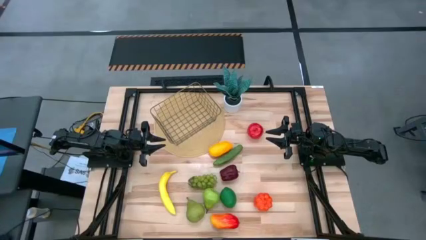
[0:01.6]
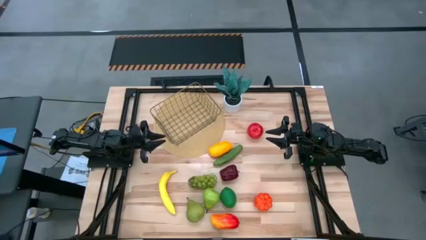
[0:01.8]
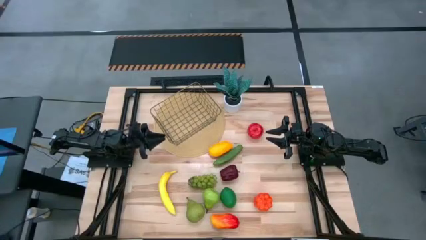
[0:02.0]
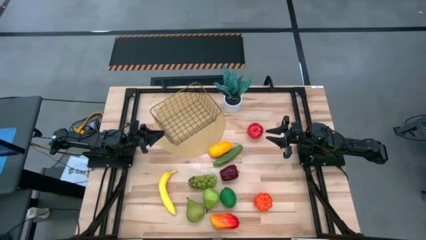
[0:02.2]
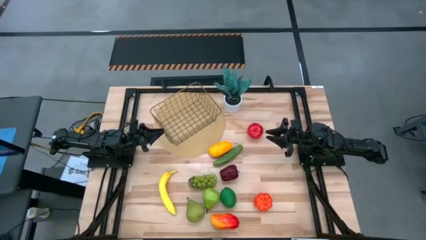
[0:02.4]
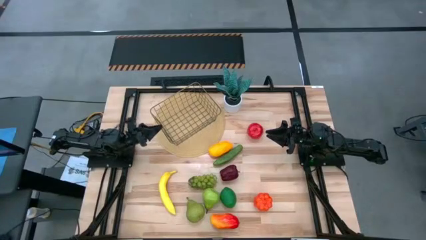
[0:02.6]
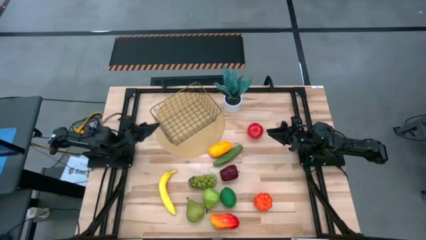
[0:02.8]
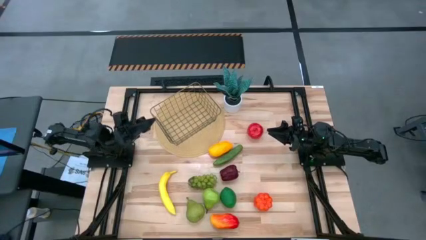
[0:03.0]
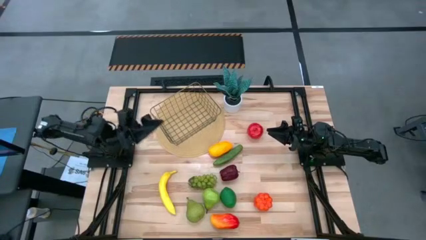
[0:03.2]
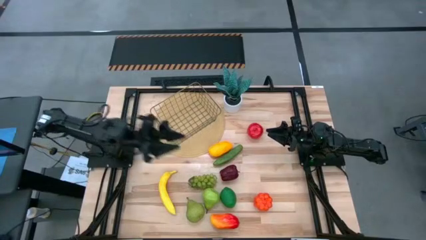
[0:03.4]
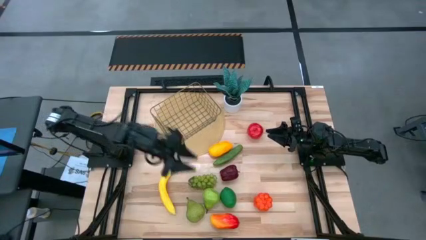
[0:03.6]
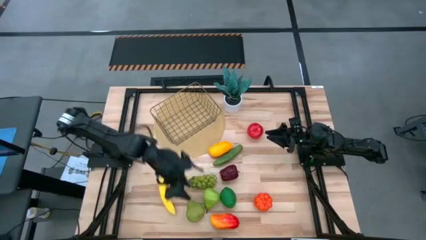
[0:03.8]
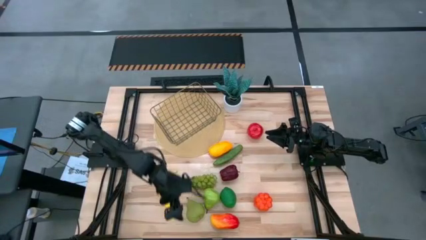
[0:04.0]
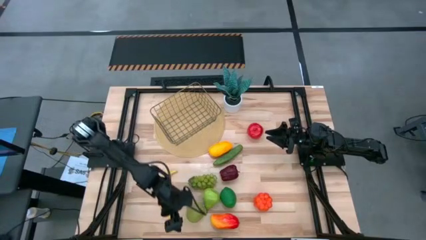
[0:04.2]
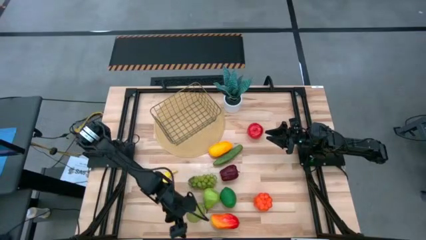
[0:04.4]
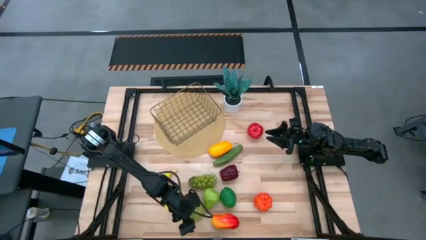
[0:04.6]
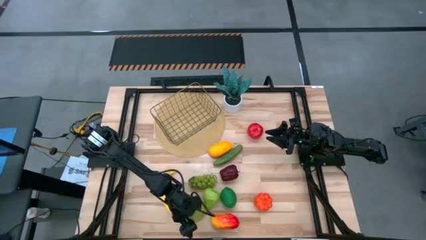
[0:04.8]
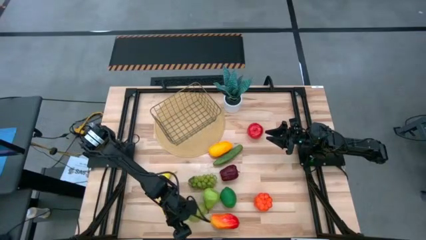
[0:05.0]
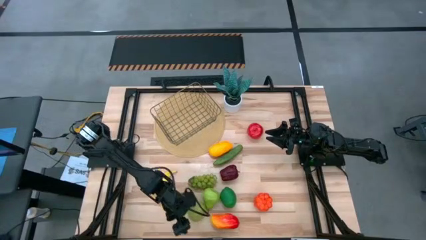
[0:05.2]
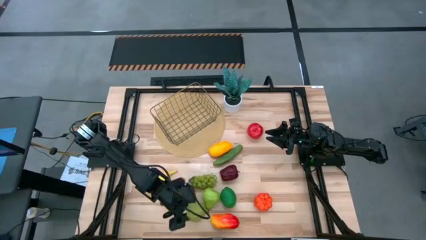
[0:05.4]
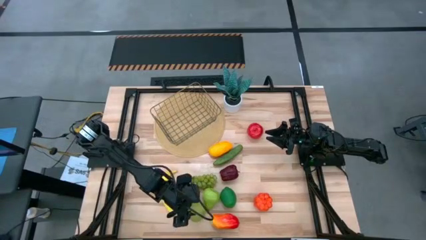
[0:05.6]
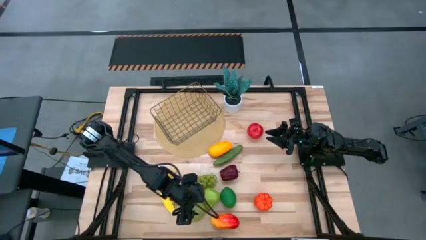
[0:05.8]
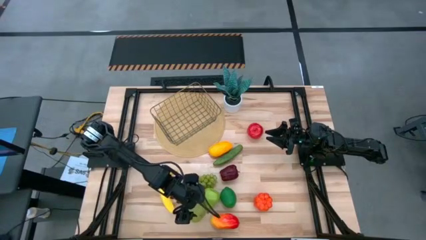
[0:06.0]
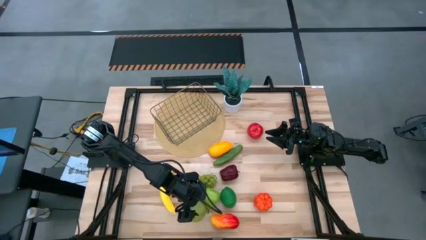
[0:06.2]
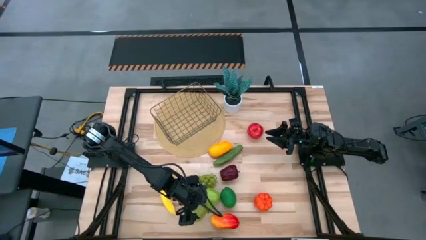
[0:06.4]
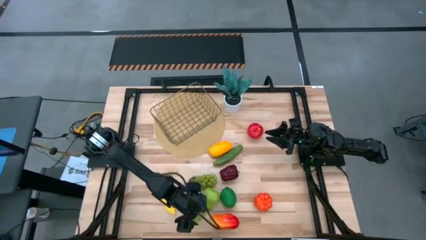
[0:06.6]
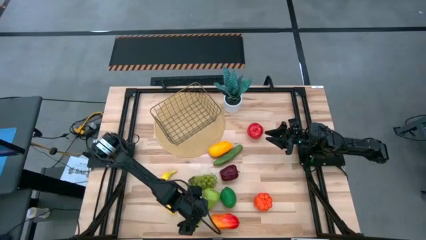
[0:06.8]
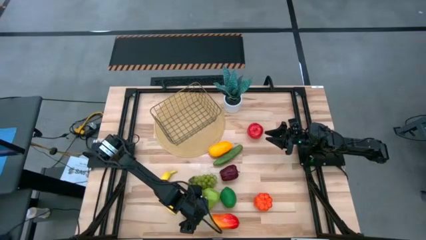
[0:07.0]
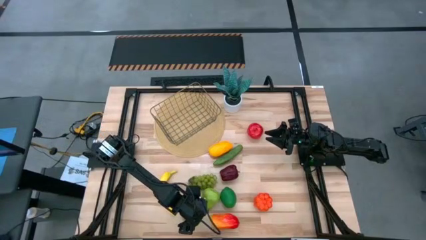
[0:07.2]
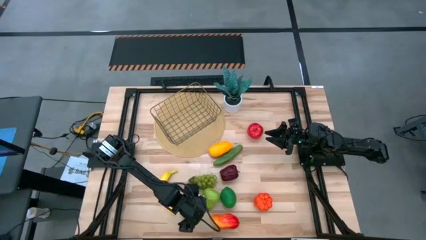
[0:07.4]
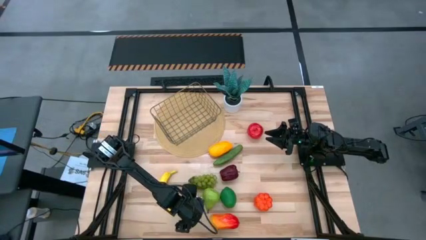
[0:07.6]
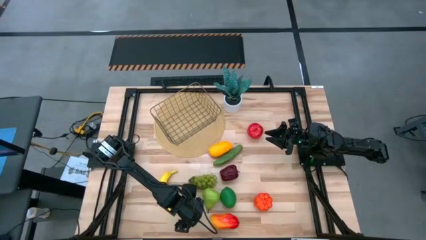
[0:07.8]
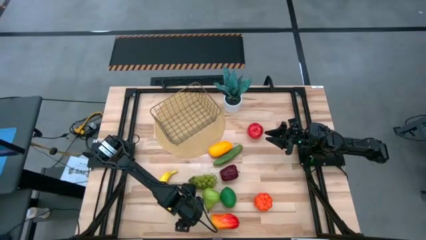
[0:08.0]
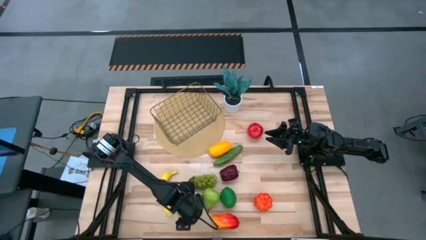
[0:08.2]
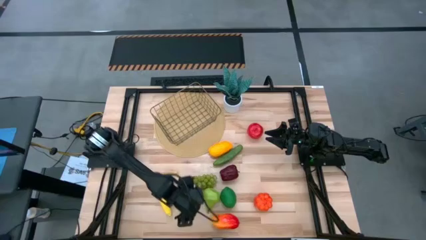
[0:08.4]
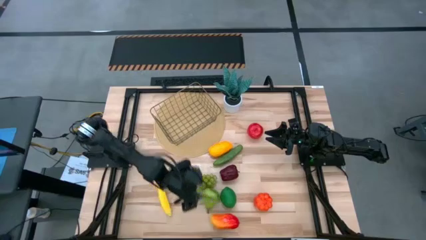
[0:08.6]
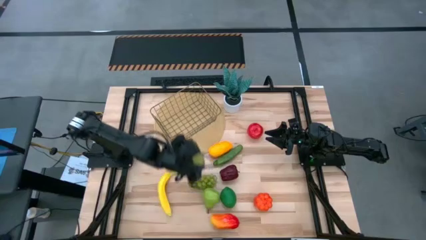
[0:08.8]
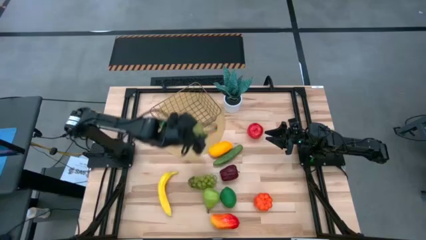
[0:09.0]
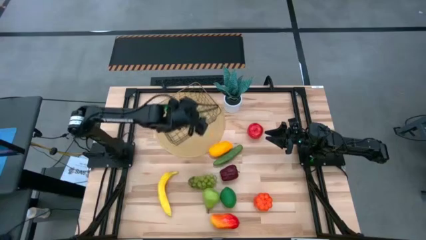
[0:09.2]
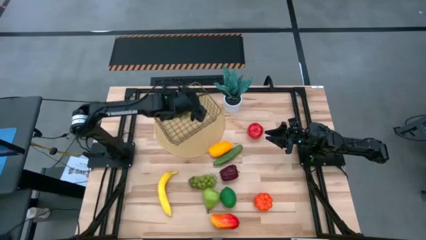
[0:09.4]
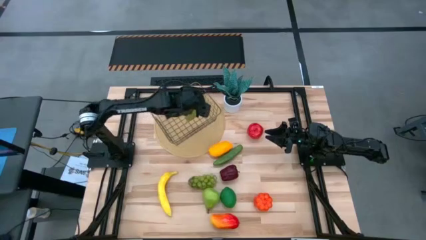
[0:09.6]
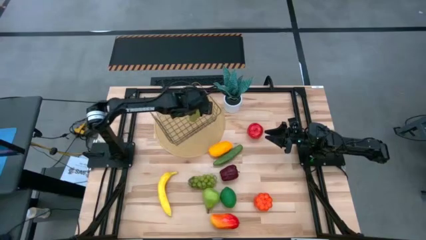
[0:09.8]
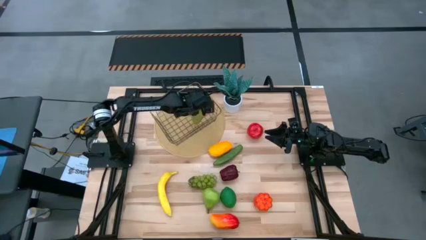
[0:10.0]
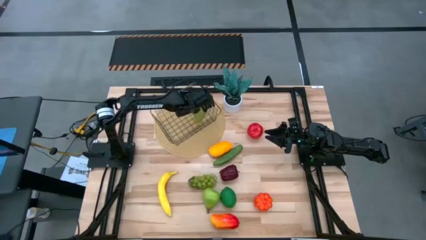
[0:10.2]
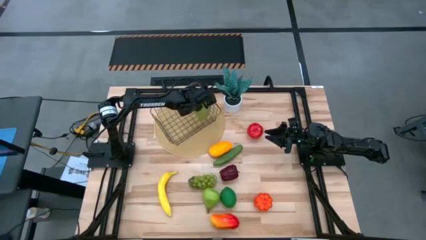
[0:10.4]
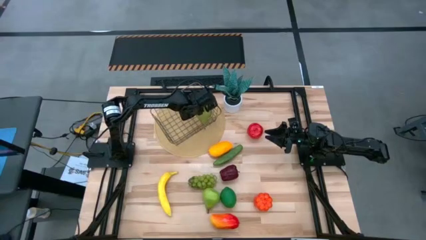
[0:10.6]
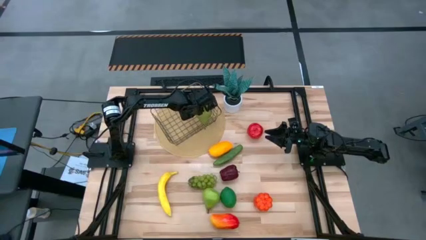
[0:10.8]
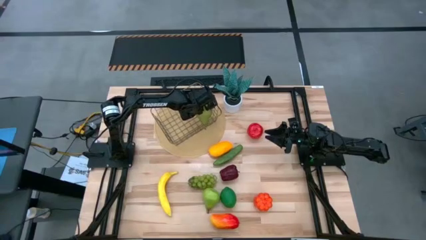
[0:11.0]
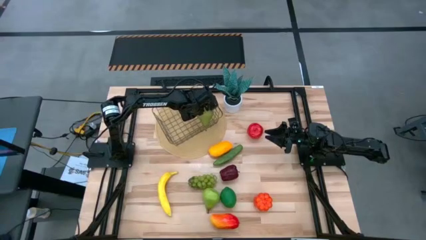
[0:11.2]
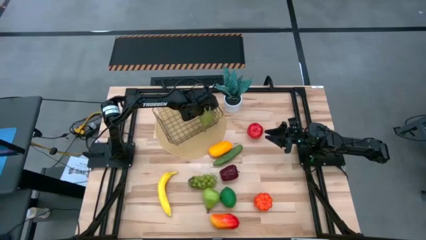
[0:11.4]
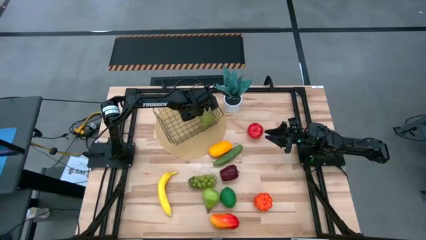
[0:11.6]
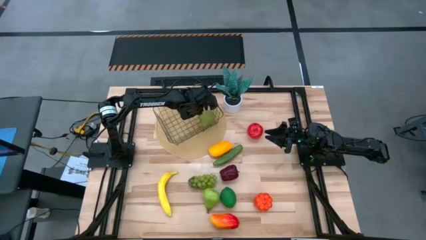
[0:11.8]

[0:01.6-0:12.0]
Task: Build produce basket
Put the left pear into the wire basket

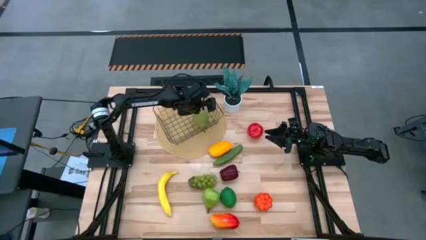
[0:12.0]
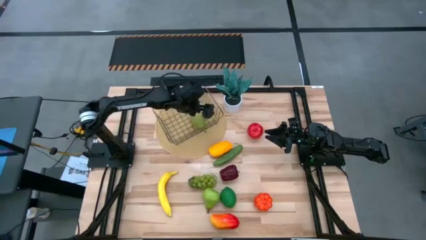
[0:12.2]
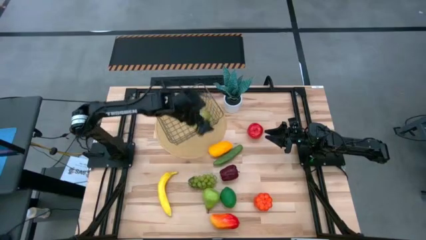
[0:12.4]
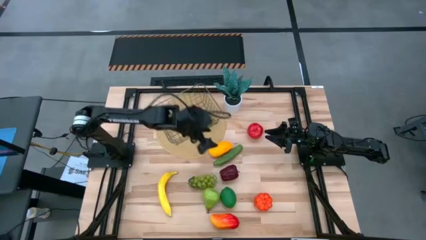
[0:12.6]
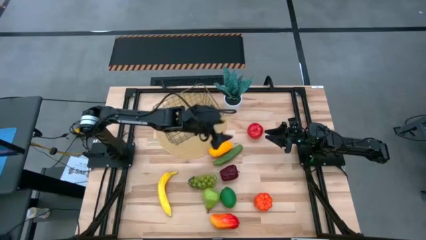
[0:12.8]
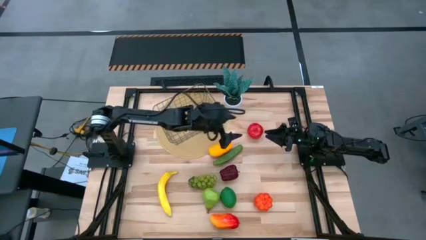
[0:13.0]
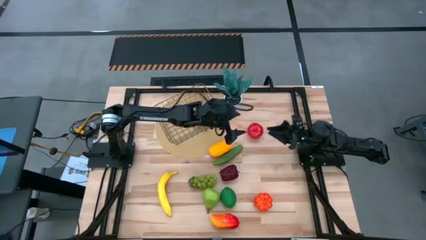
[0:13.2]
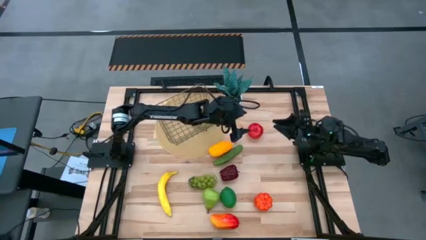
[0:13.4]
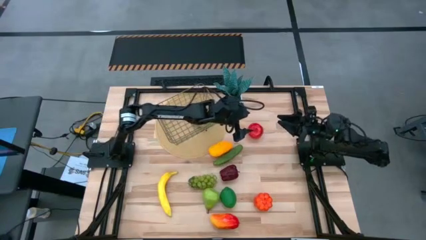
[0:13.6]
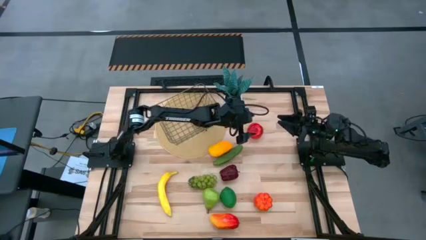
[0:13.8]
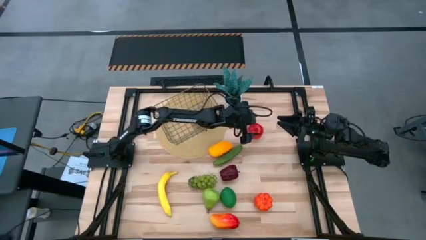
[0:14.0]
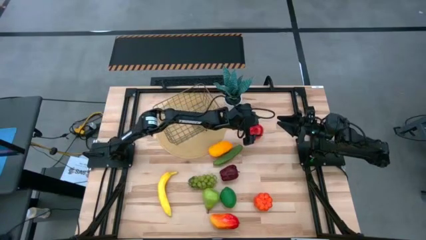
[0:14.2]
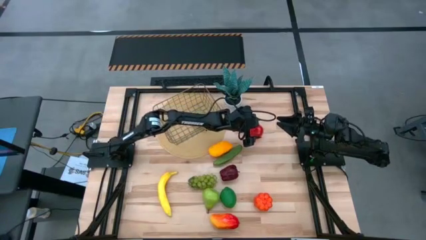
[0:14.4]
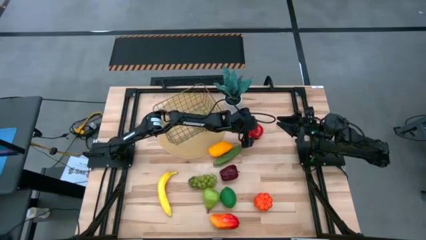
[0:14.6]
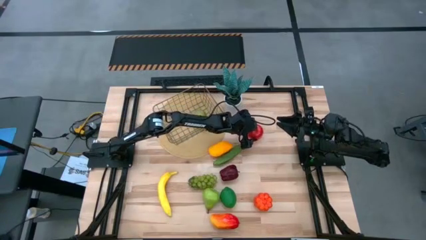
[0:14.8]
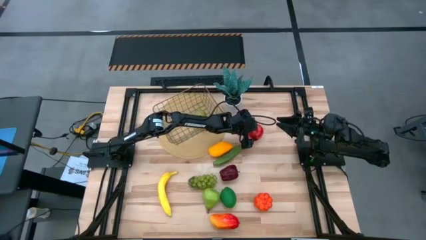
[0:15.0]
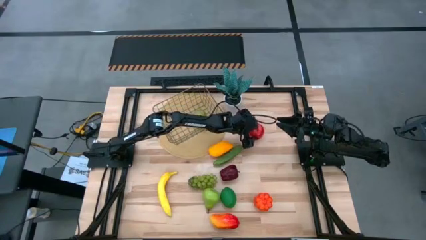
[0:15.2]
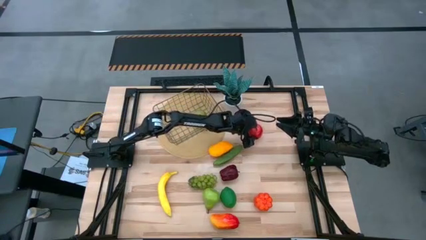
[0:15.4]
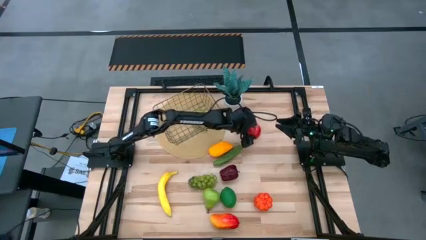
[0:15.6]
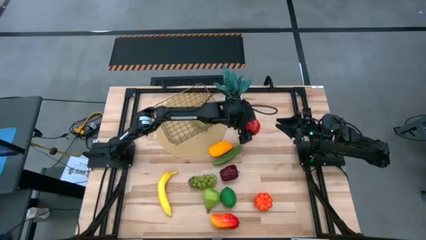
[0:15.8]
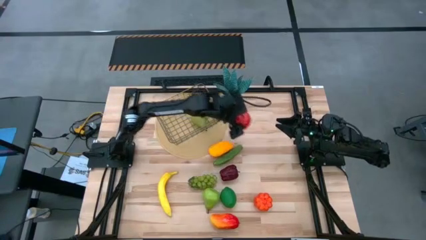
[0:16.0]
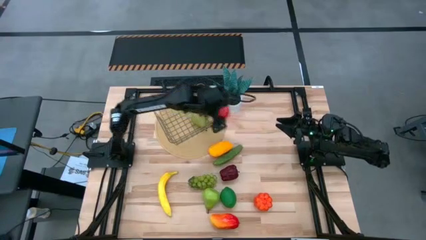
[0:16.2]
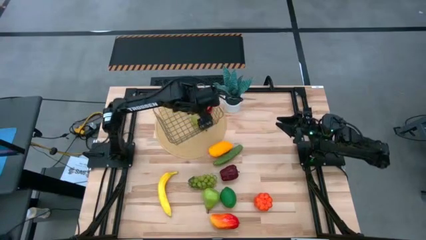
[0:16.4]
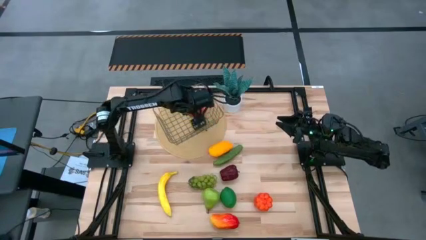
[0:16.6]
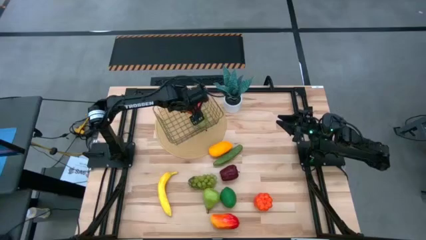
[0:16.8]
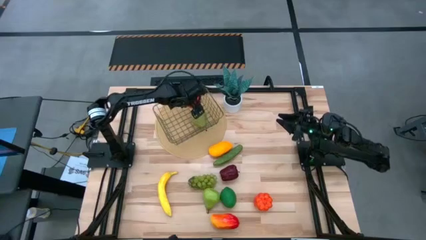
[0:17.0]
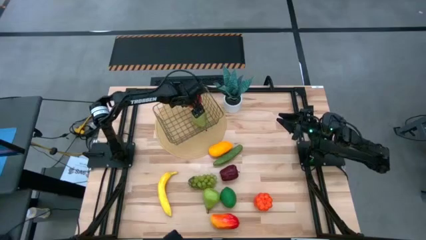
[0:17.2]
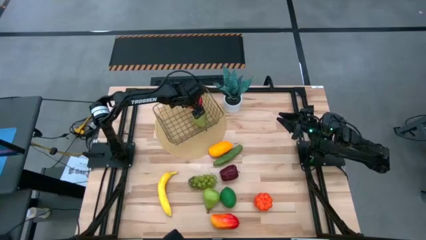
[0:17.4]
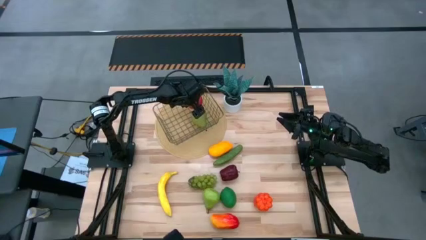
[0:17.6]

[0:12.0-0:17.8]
Put the red apple into the wire basket
